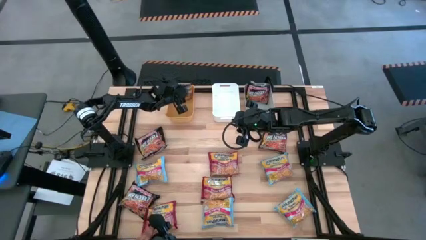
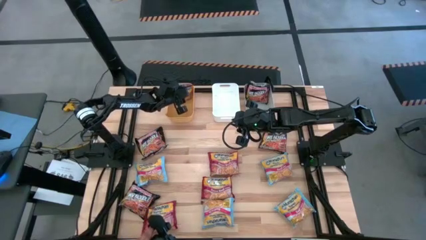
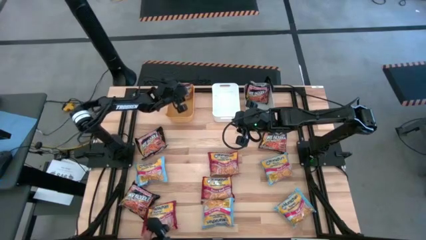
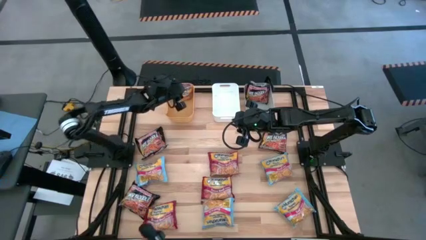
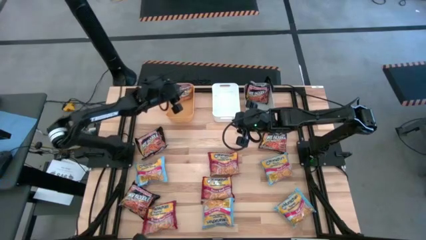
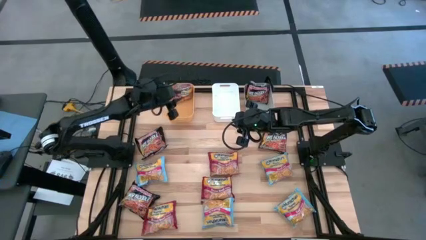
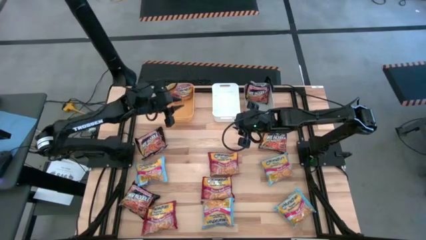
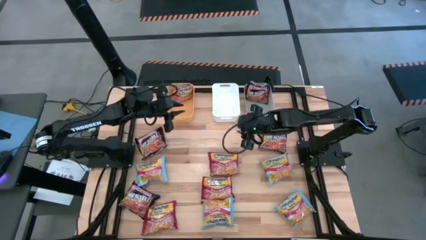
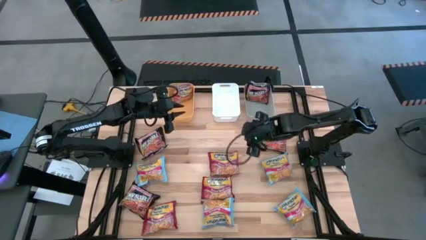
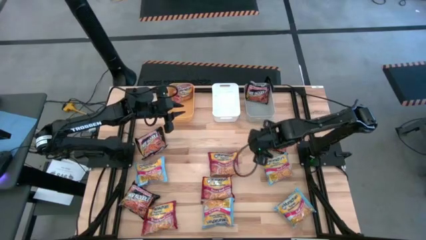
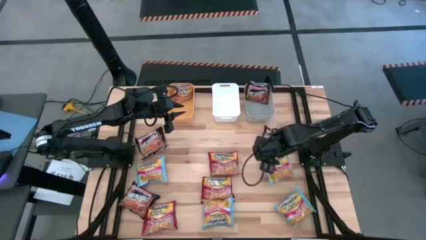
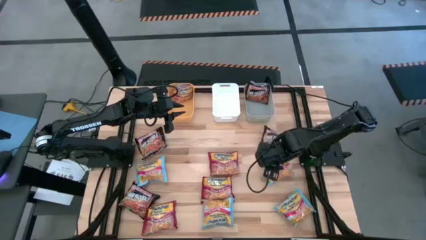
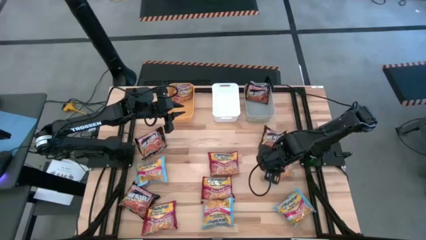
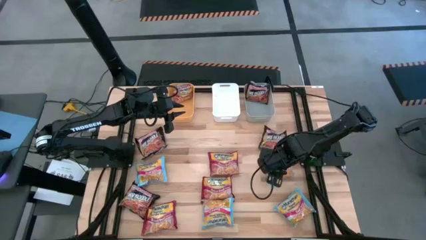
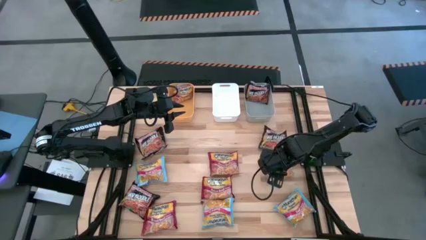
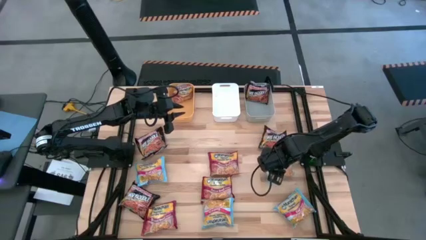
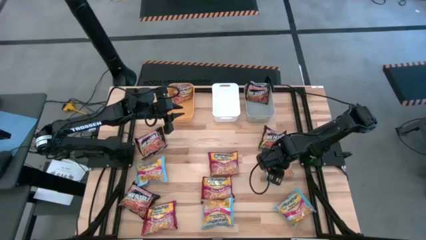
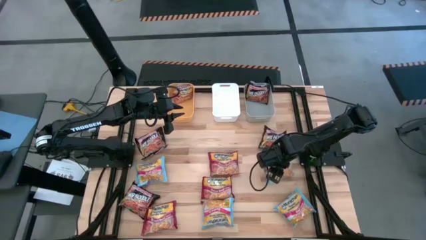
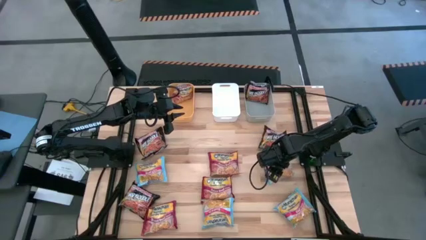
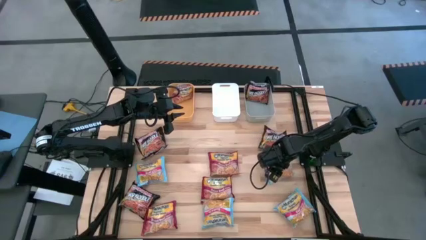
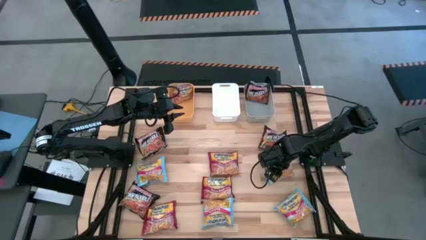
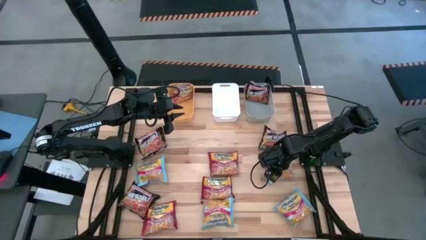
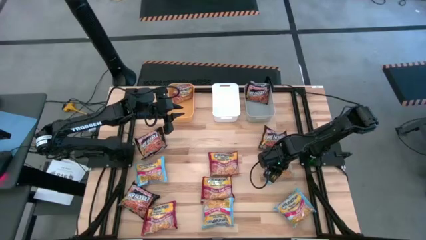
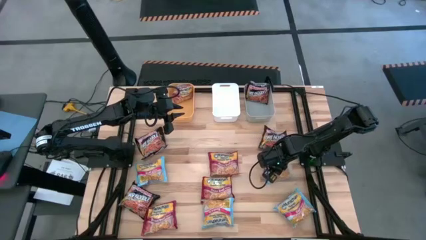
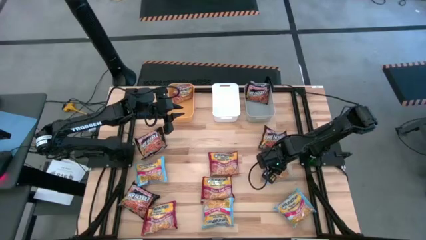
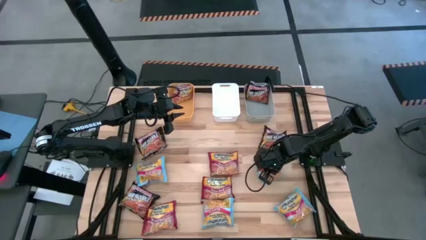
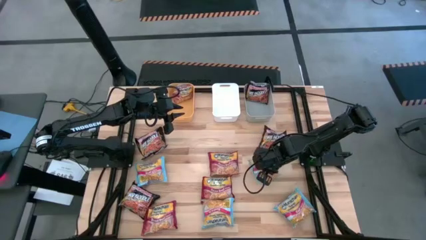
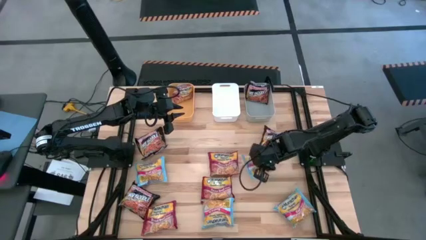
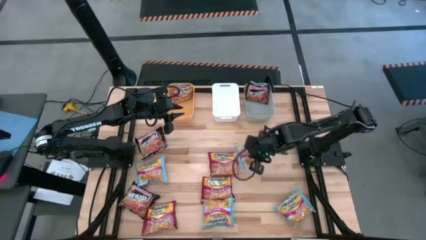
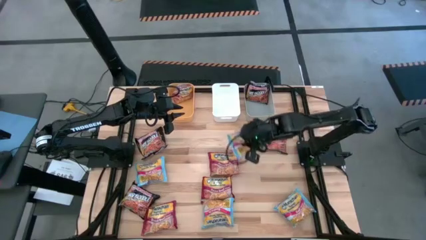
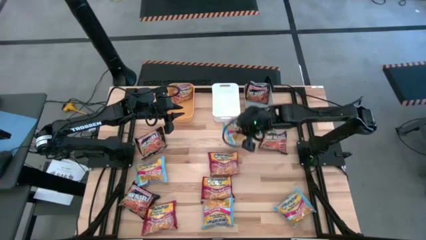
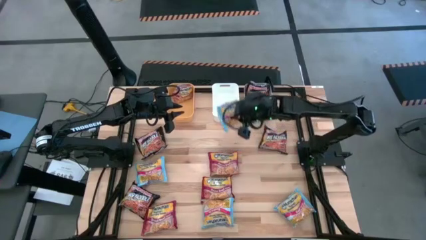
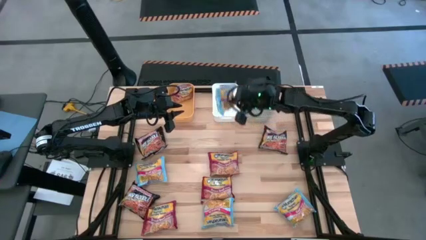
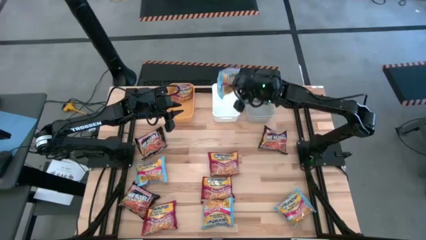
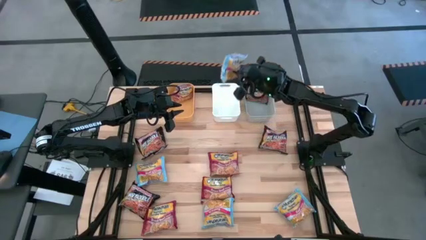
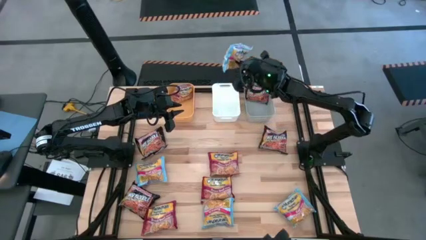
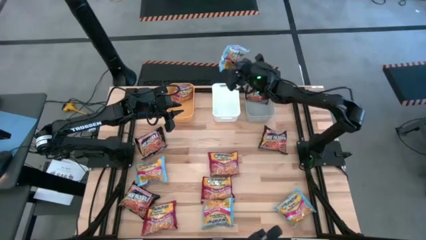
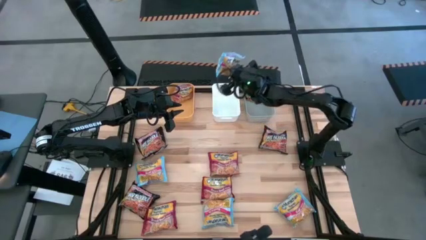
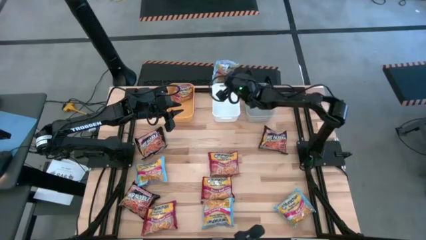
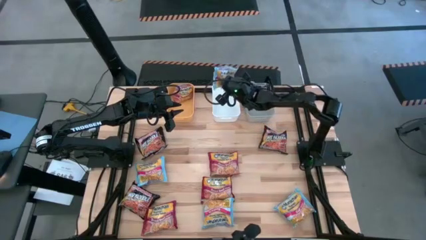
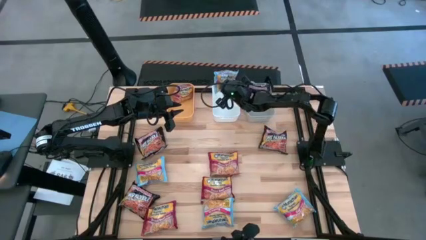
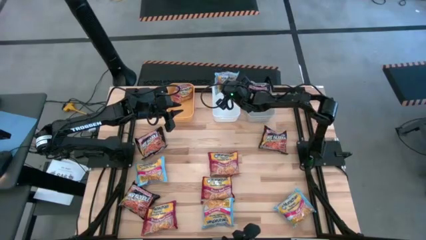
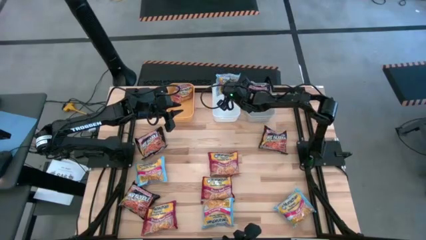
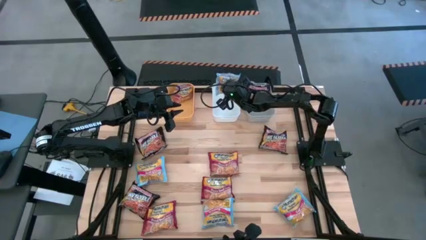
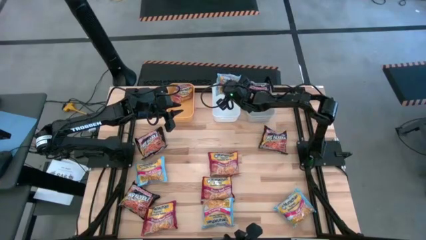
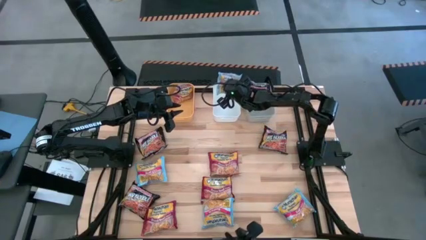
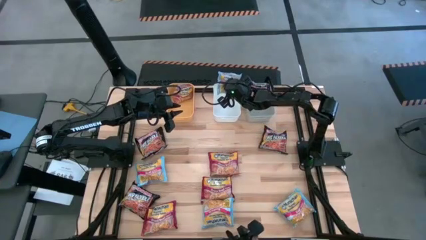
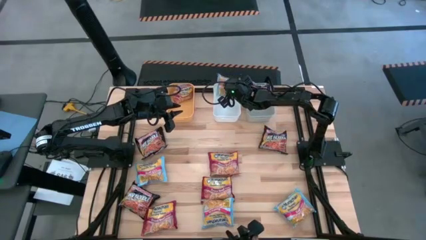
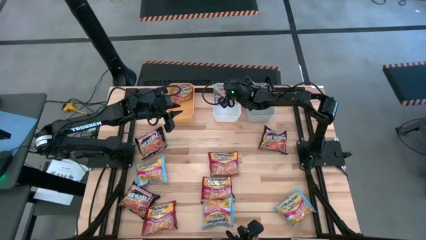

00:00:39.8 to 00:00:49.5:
Task: Sort Maruchan noodles
Put the blue noodle pack into the white bin

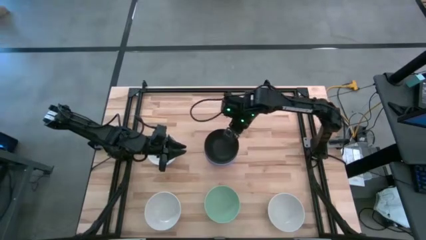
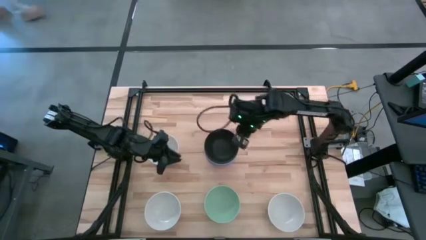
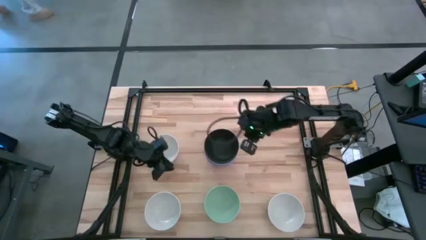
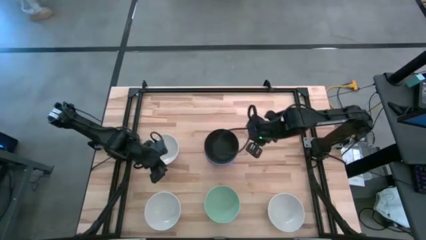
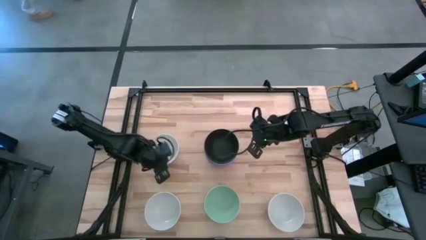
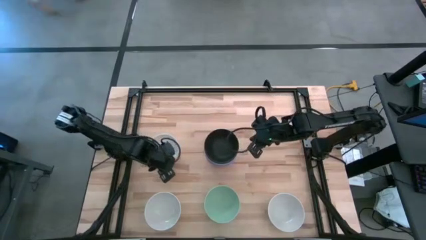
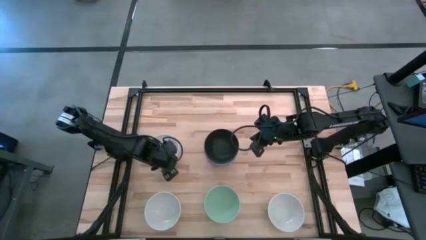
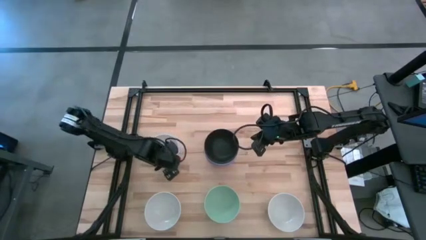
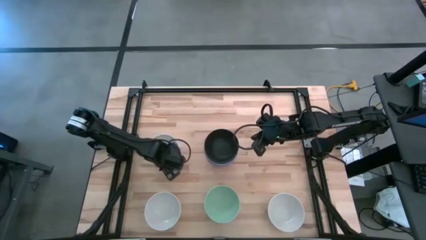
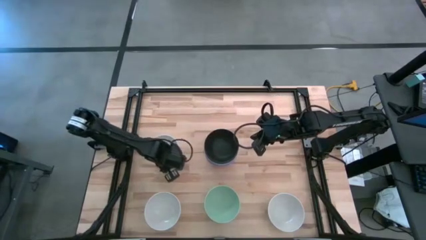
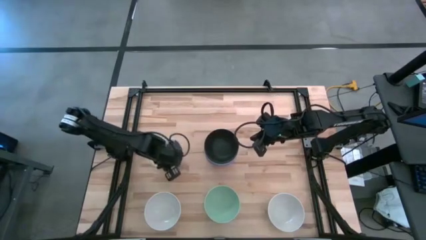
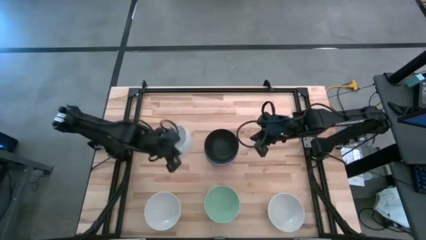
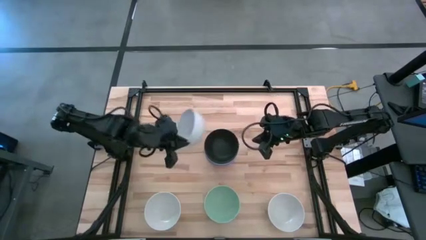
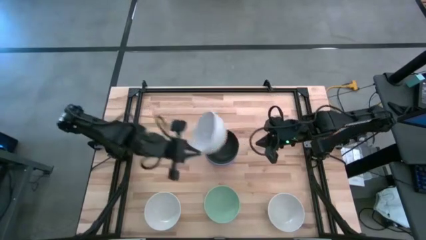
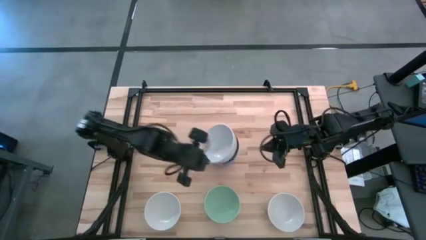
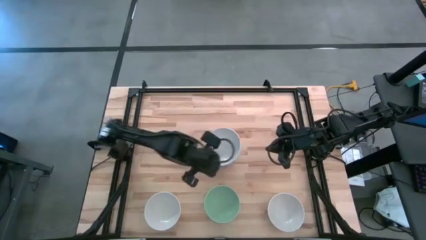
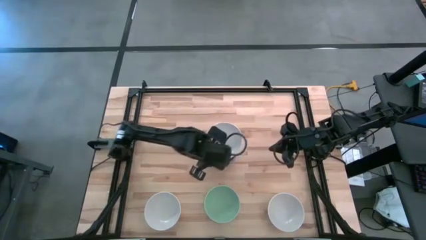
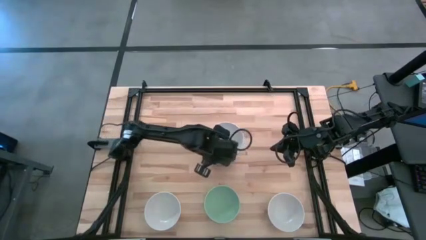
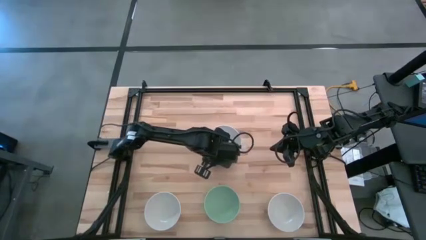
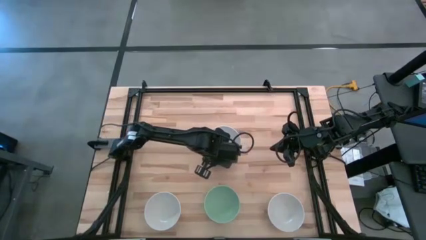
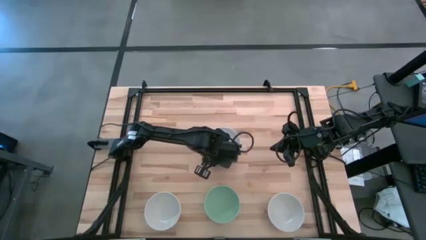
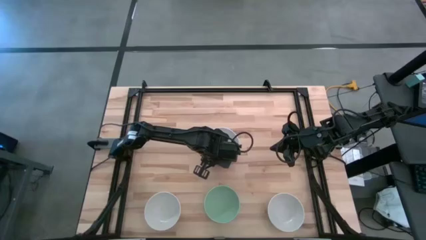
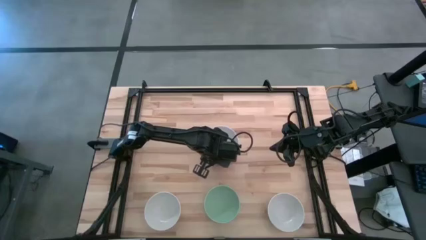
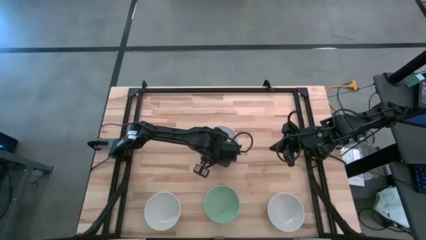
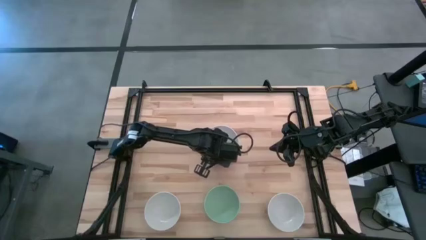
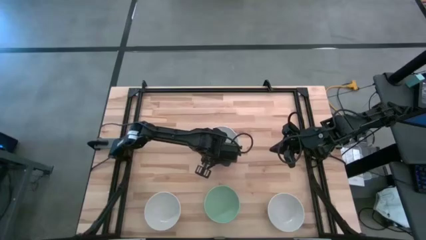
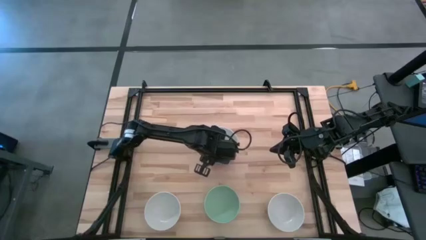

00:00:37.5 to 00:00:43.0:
Task: Nest bowls inside each other
Stack the top left white bowl into the black bowl
